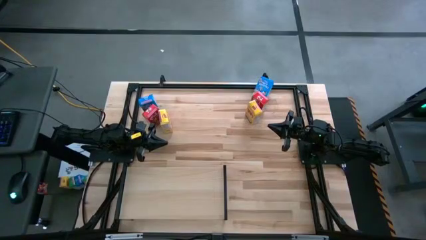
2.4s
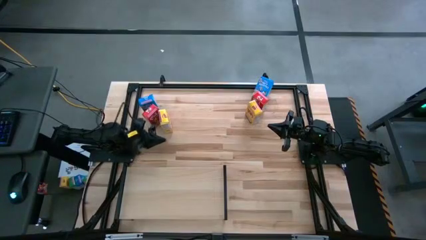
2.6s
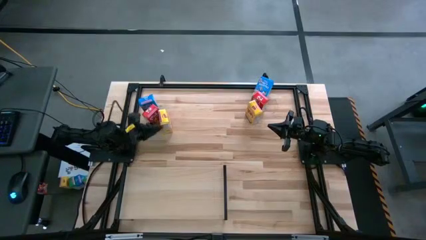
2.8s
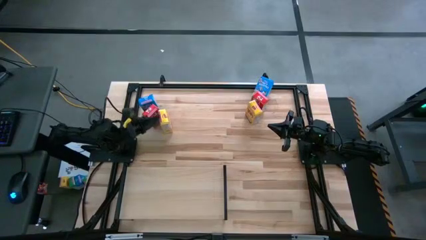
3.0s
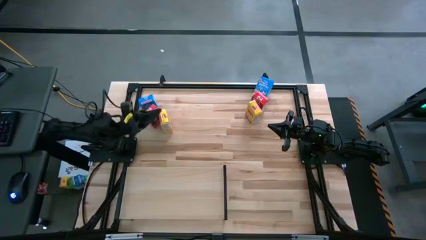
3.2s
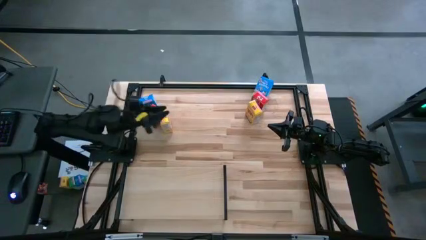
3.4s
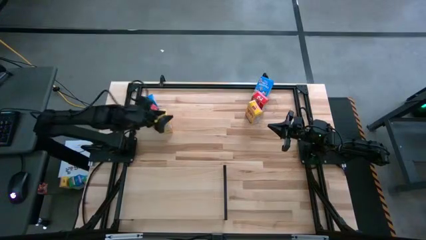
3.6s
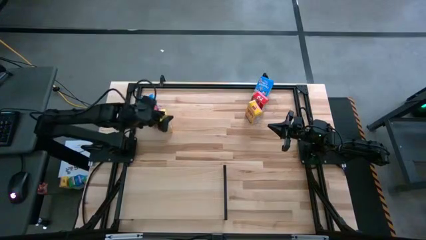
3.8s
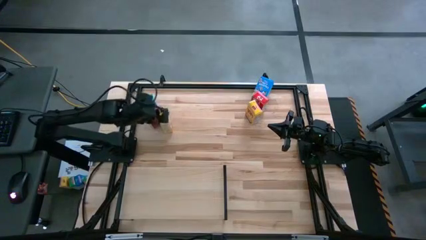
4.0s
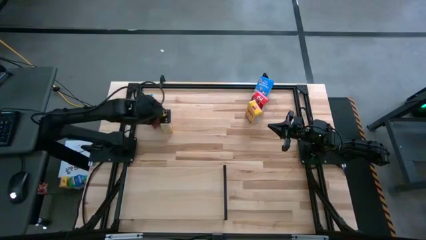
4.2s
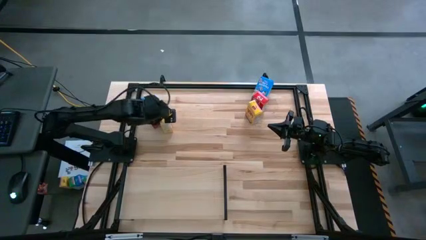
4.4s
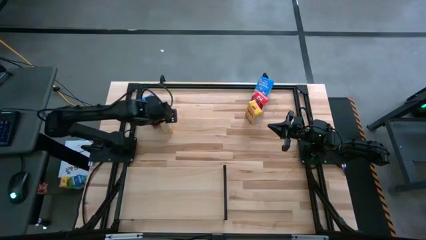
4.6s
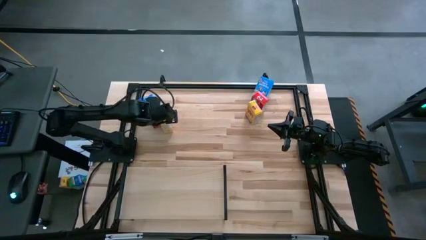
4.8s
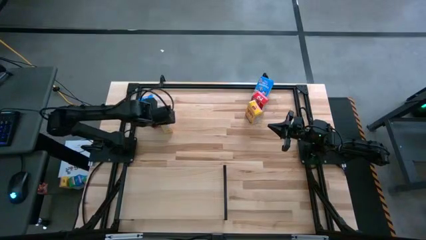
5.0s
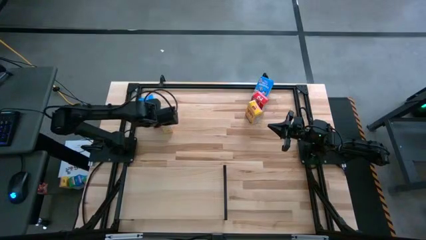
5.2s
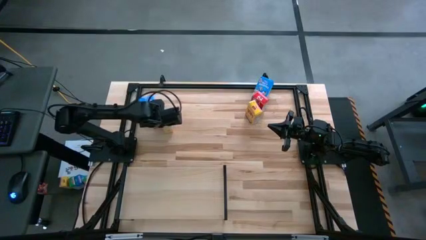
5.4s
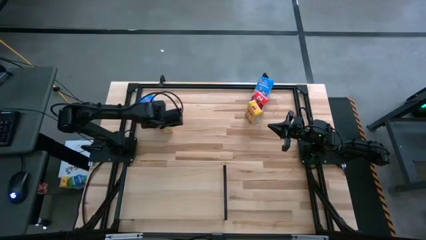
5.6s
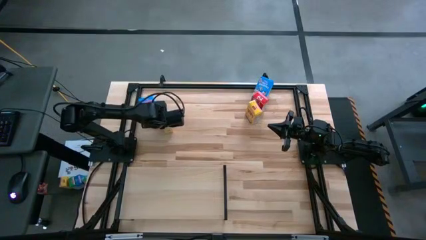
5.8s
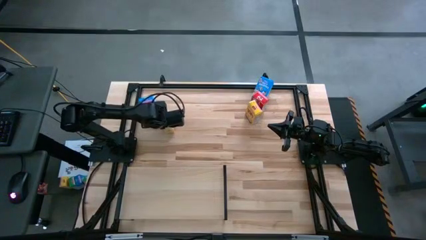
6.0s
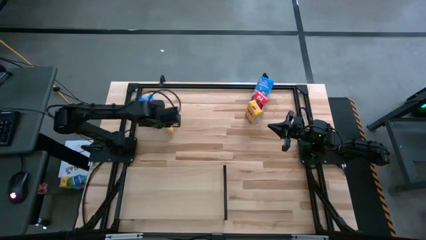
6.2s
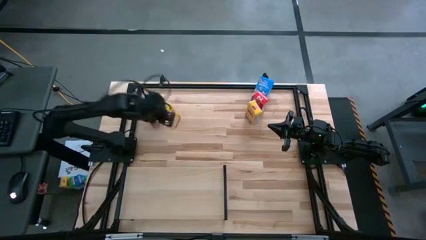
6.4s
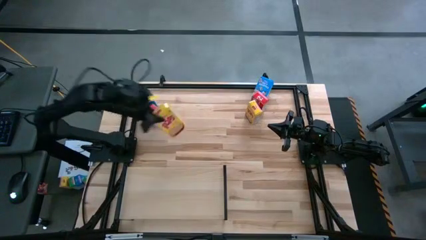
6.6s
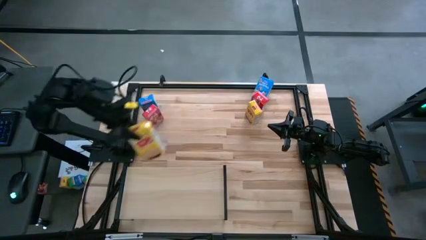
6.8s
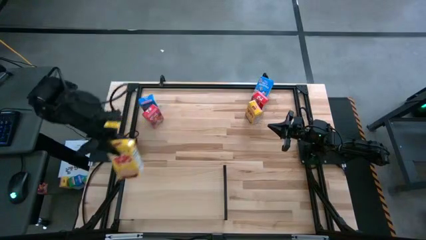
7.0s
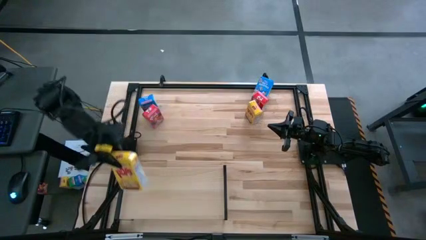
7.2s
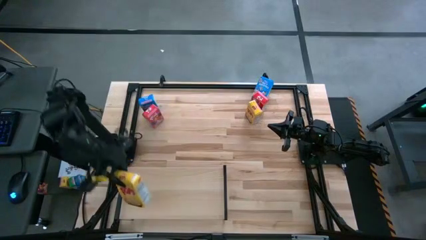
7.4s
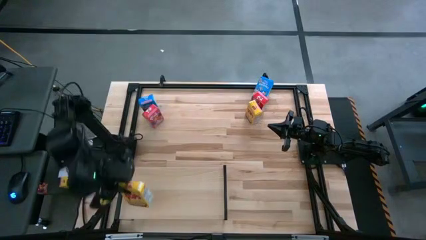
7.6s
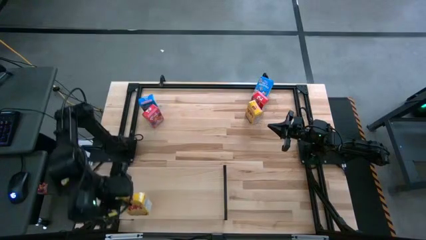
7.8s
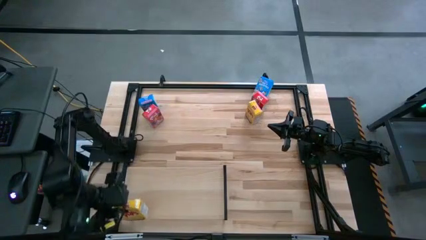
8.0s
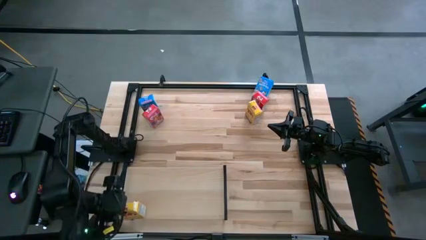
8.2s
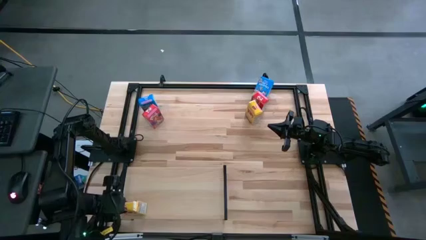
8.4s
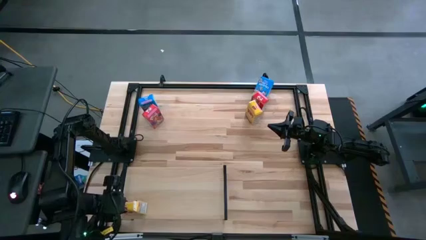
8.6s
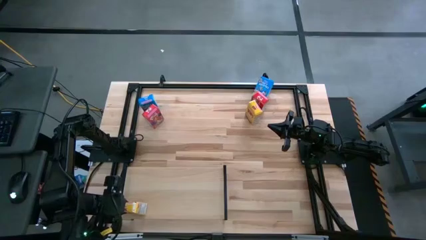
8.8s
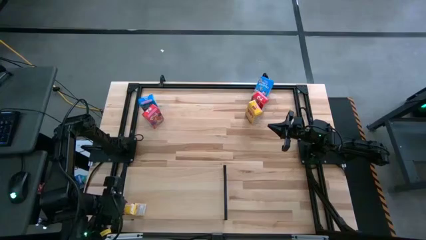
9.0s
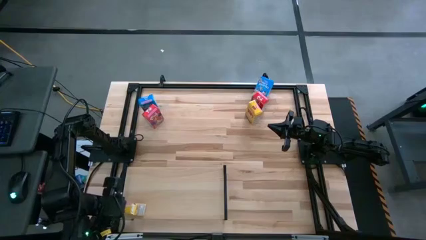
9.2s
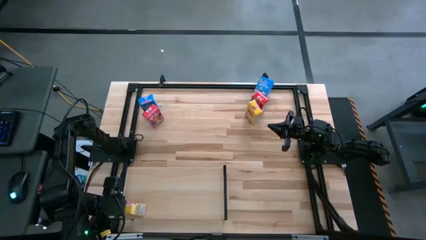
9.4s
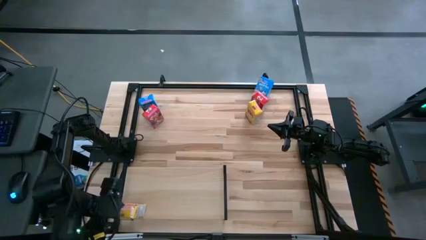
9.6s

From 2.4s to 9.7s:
Task: Stack cereal on shelf
Put the left yellow cereal box on the shelf

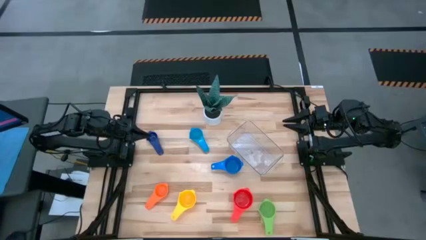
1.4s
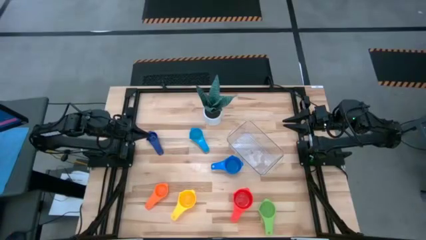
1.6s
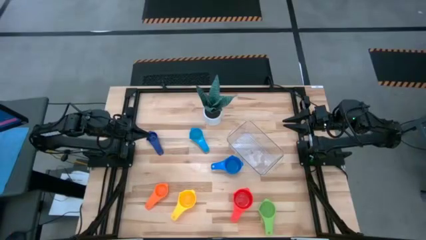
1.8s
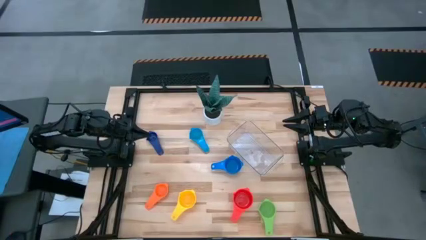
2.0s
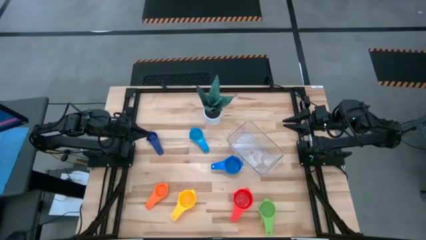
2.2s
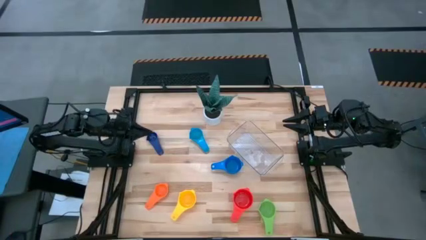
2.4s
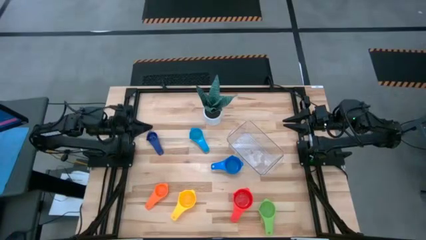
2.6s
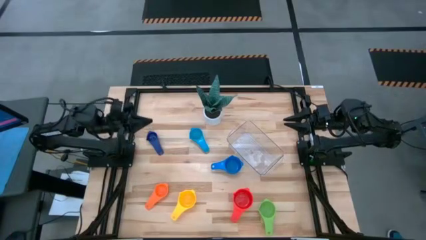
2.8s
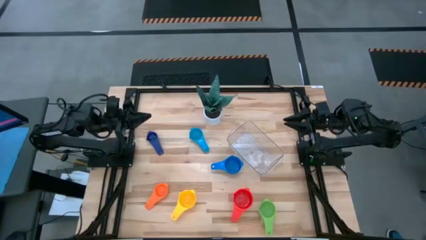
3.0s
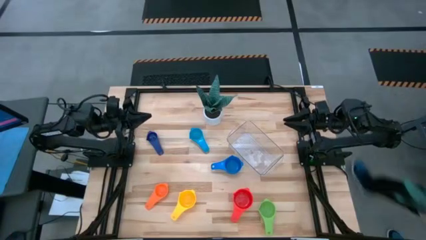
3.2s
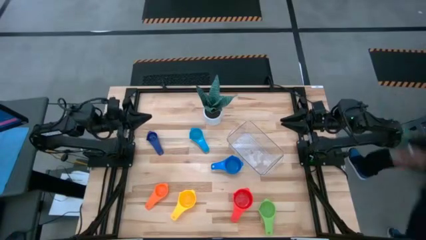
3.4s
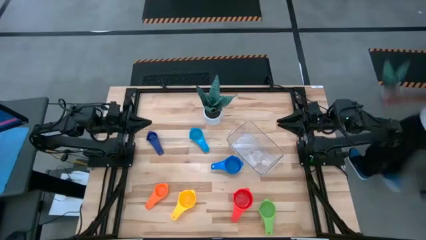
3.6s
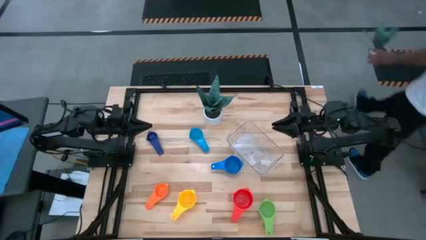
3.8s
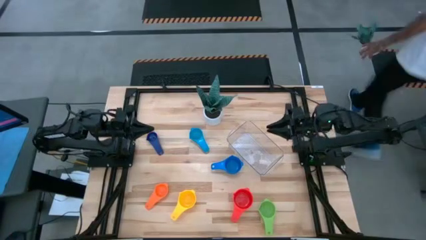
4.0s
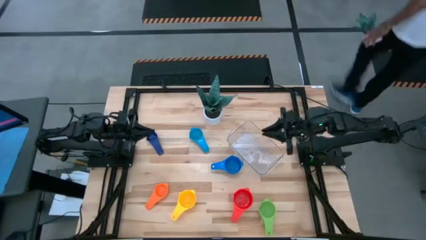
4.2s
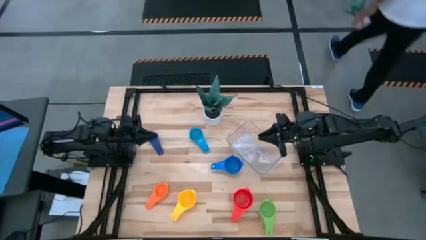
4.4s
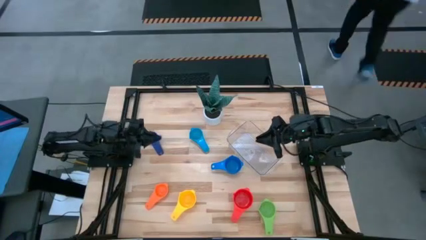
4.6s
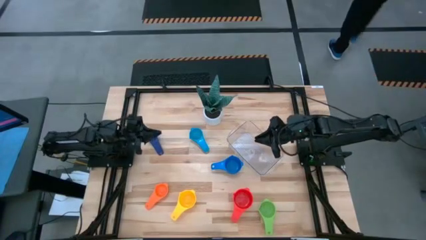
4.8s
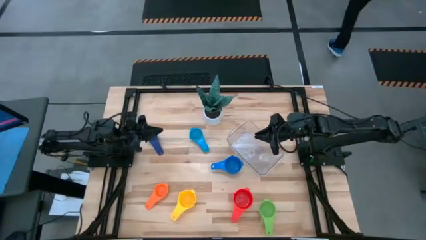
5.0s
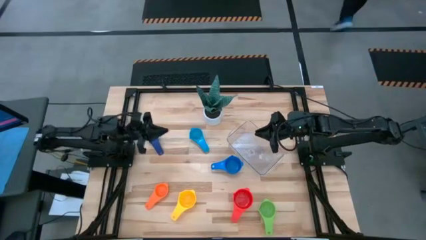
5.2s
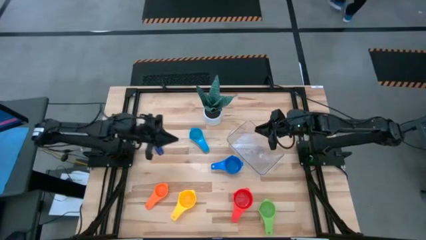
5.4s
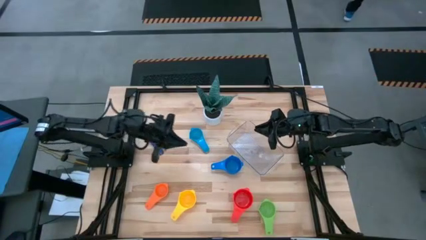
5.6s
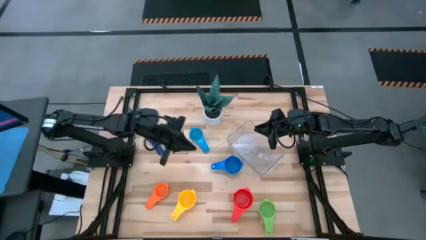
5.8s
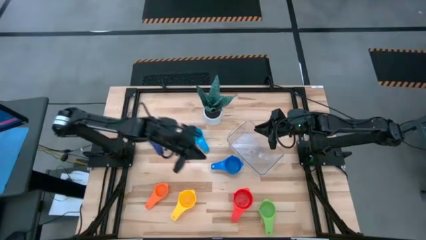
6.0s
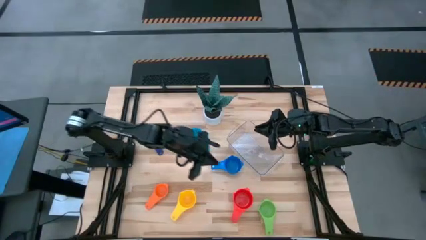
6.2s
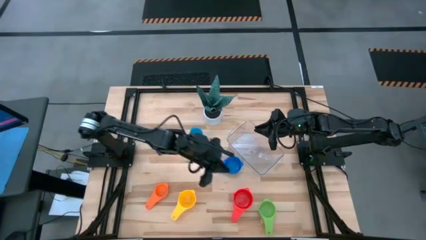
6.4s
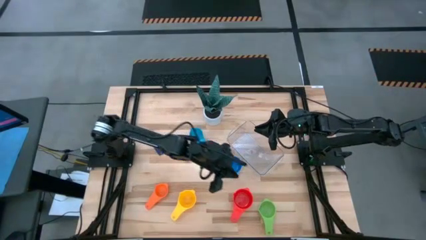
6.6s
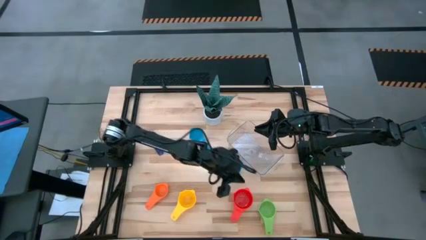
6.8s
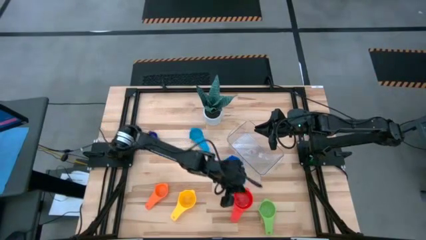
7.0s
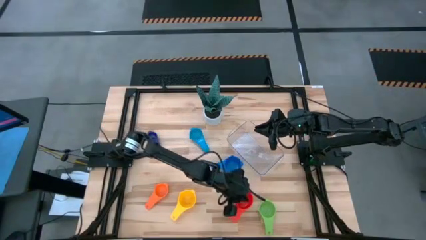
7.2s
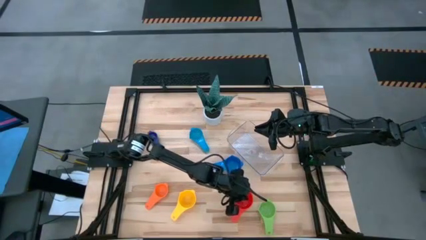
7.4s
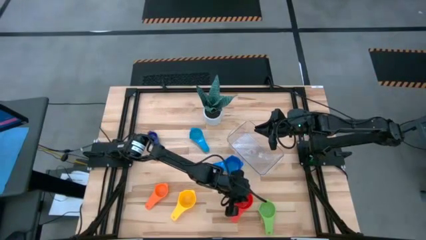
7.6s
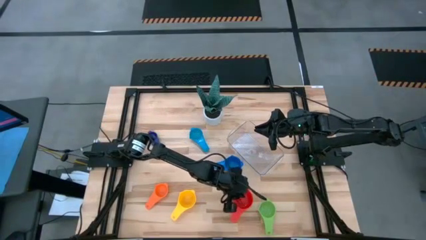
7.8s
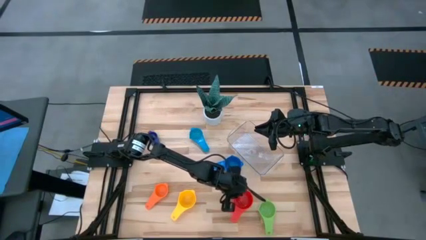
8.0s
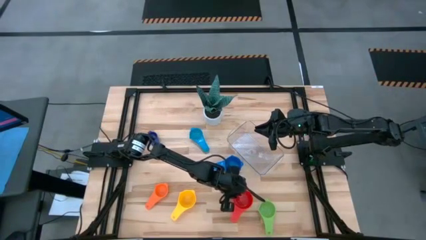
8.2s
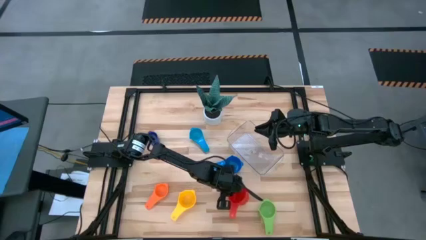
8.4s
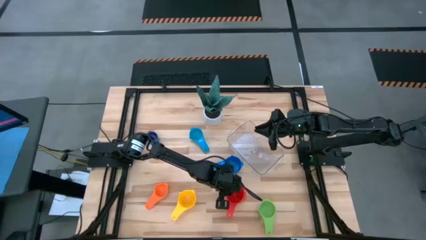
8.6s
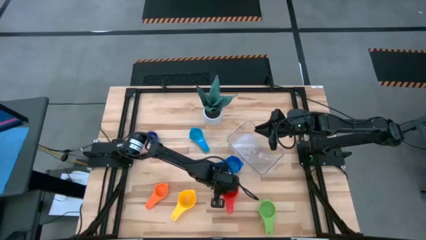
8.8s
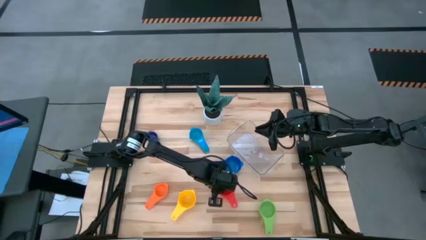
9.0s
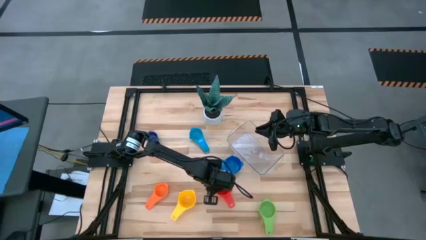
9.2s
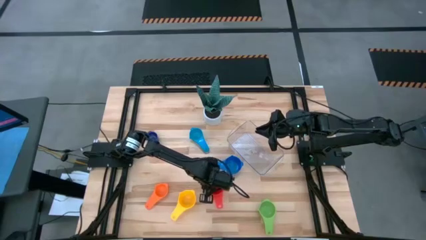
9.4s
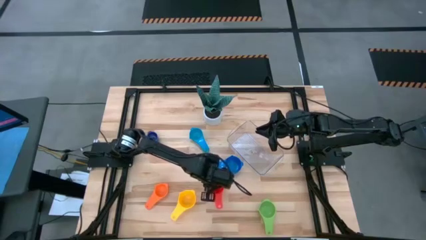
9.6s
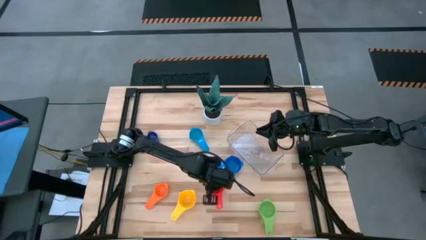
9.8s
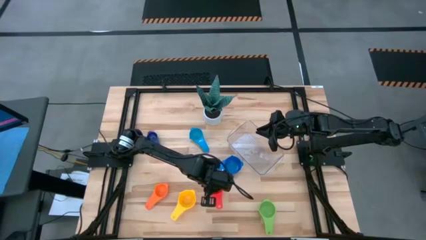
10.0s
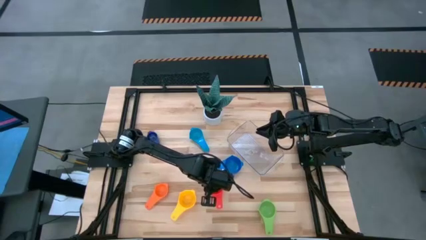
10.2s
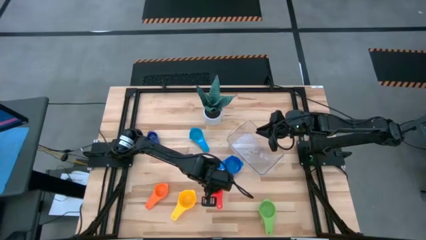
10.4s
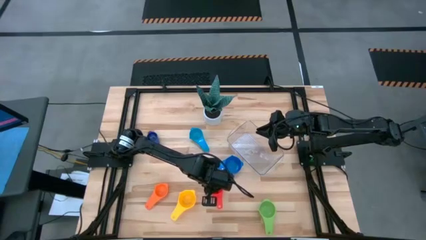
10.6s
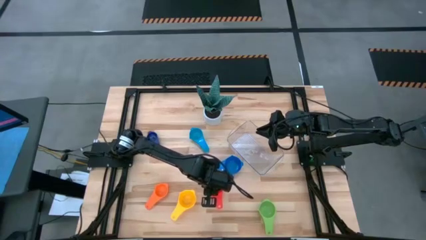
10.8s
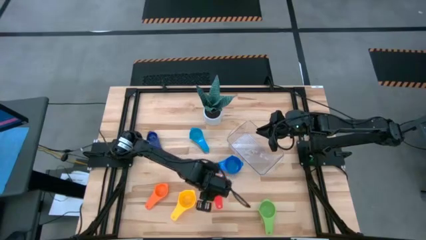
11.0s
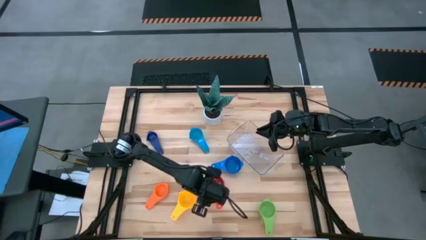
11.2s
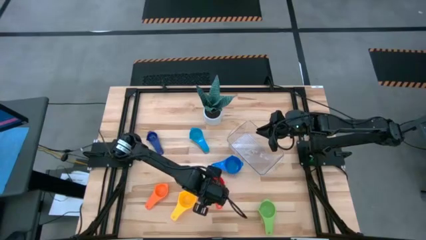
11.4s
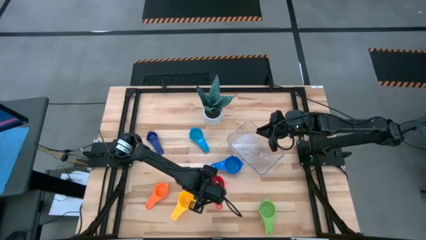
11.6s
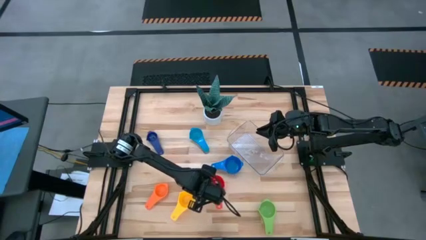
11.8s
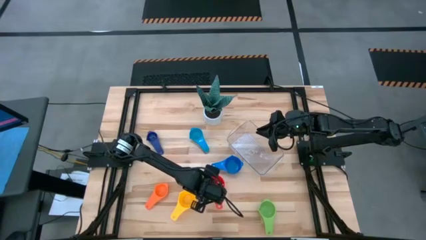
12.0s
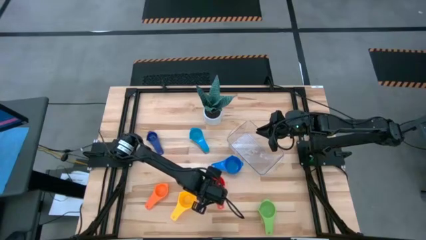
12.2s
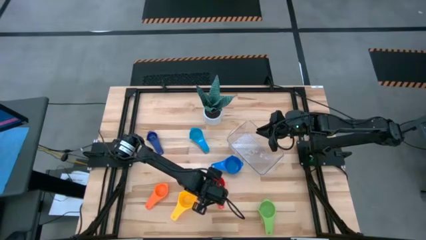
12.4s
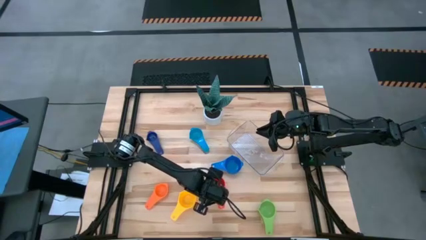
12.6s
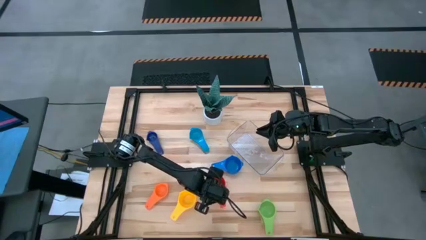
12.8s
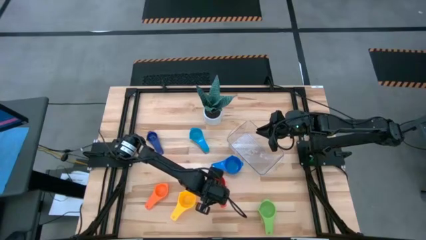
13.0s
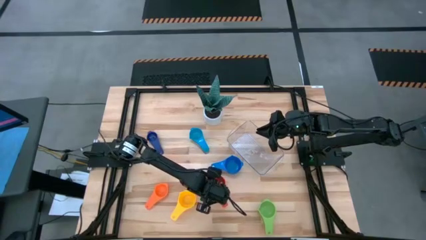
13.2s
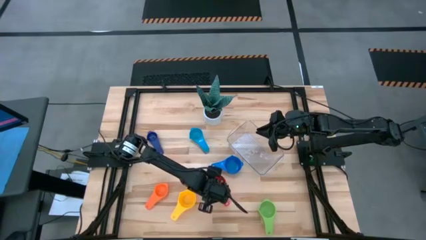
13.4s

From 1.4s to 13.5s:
Task: Nest measuring cups in basket
Put the red measuring cup into the transparent bin
